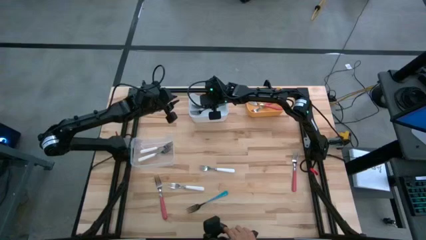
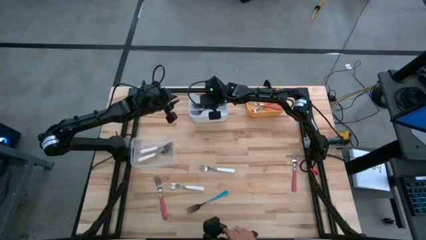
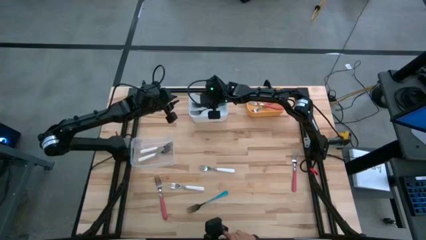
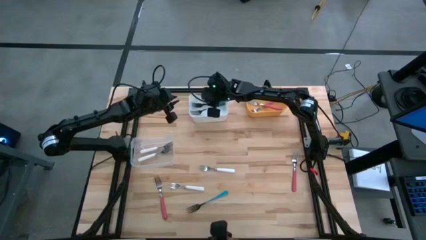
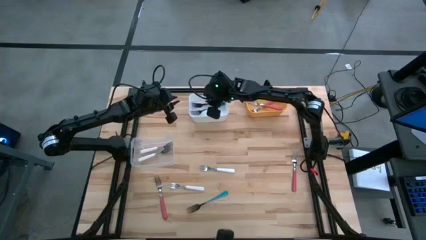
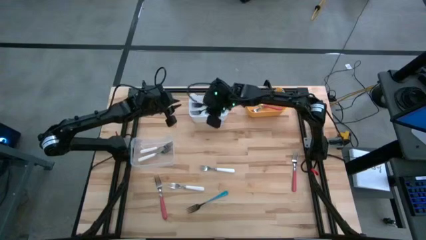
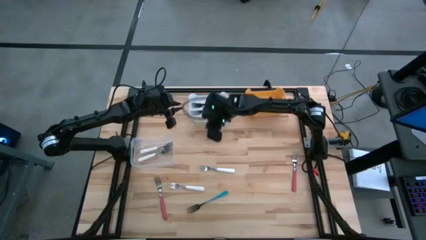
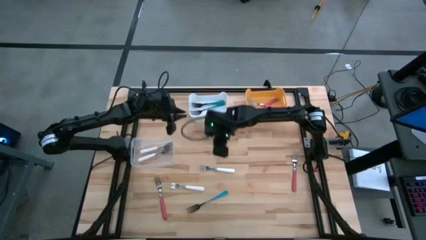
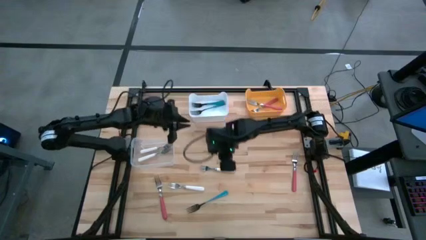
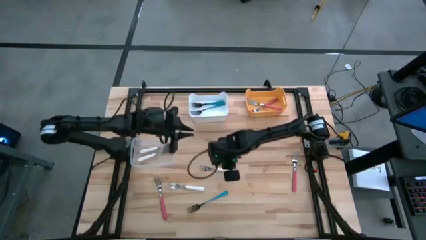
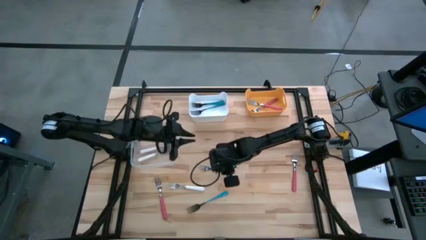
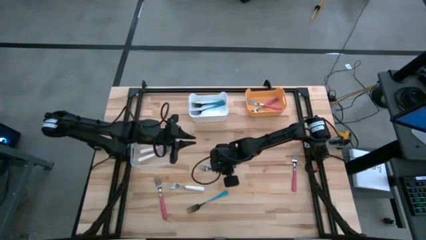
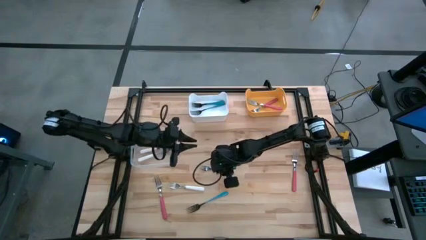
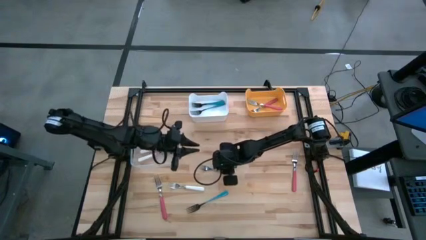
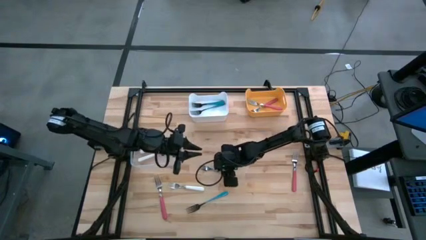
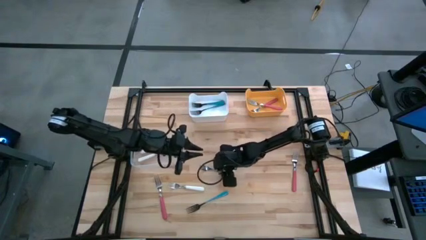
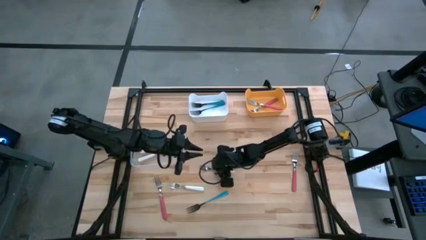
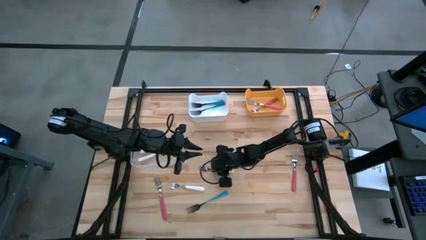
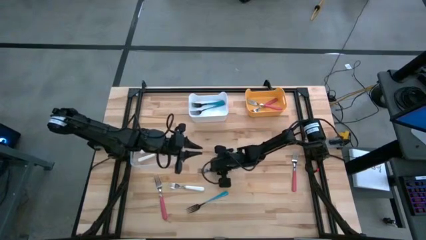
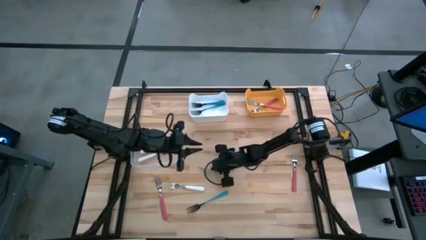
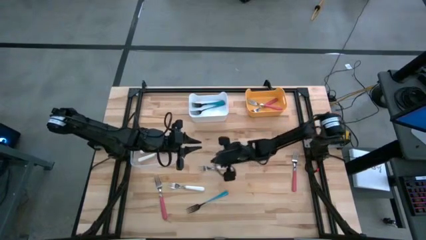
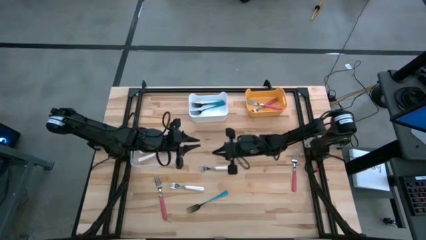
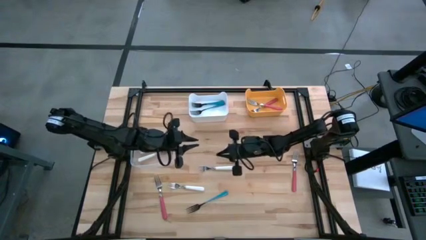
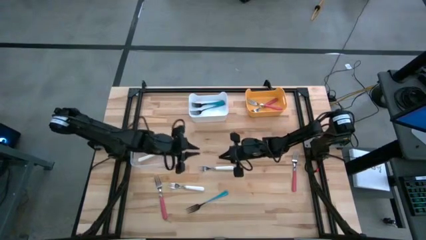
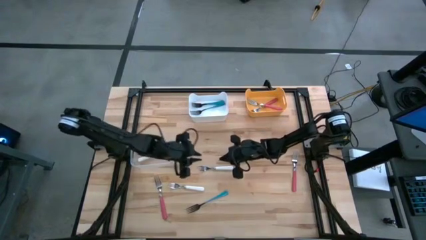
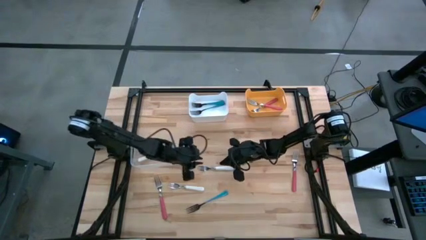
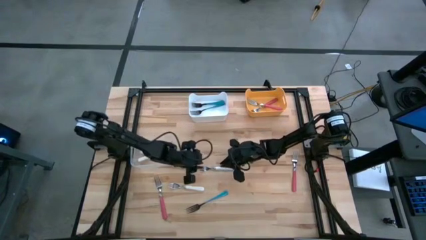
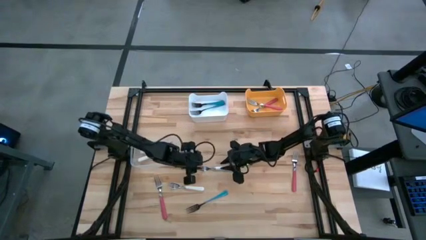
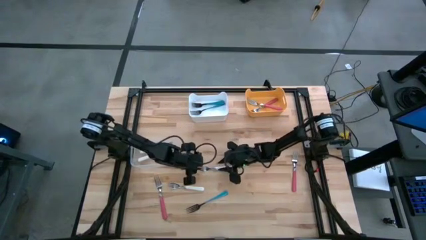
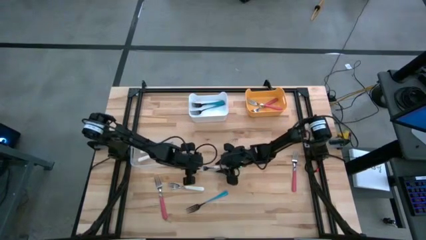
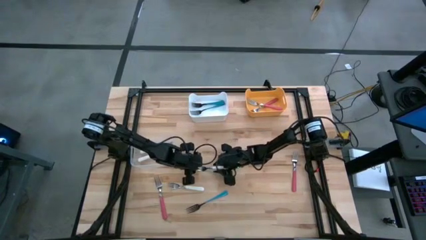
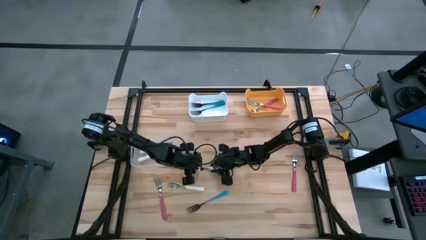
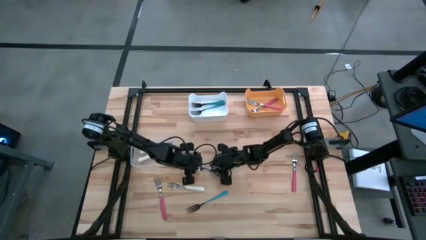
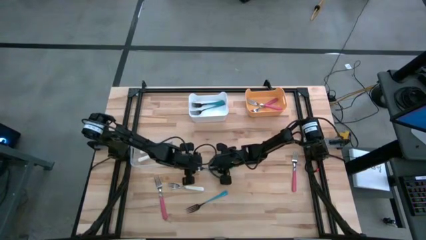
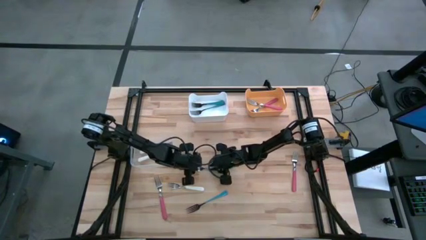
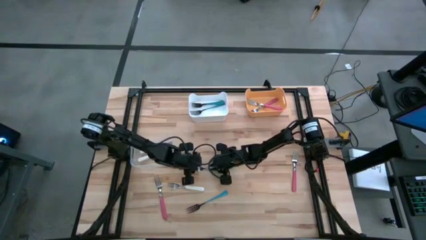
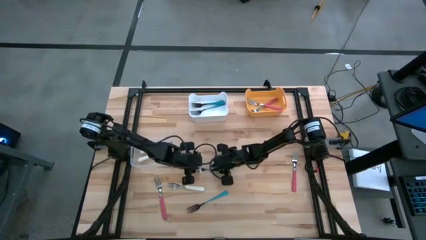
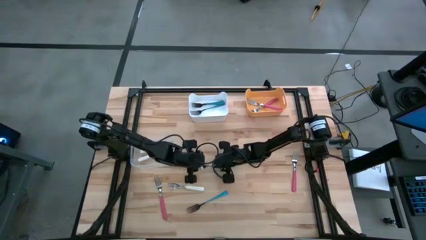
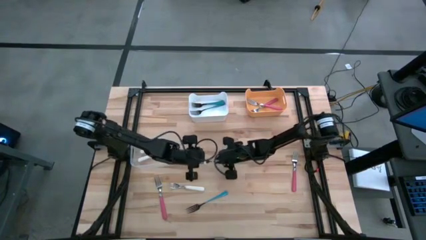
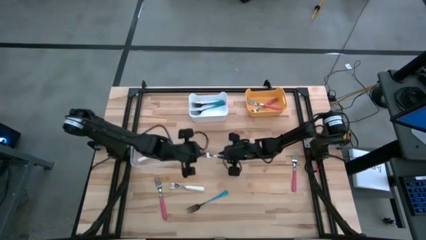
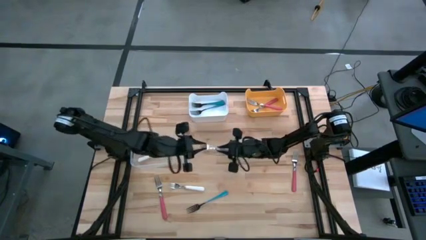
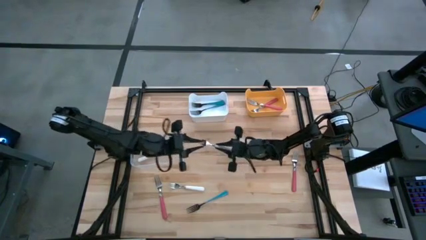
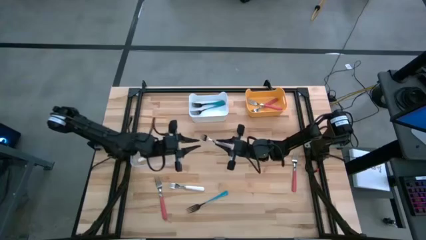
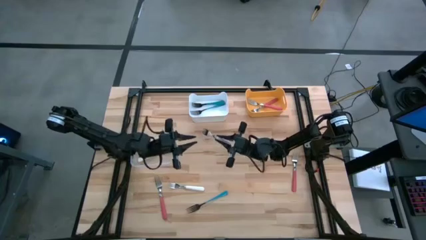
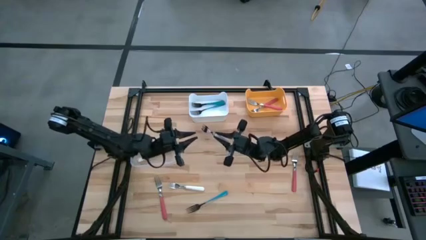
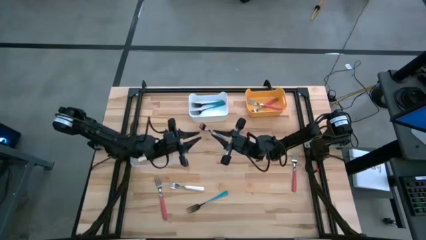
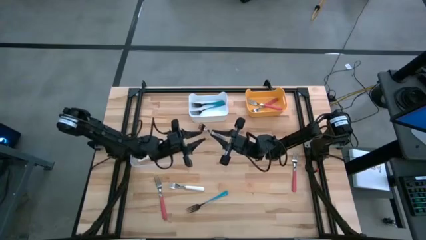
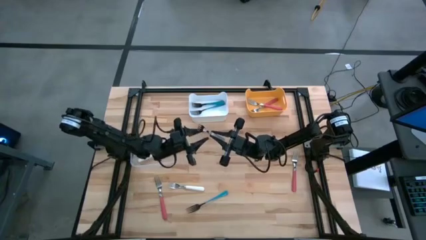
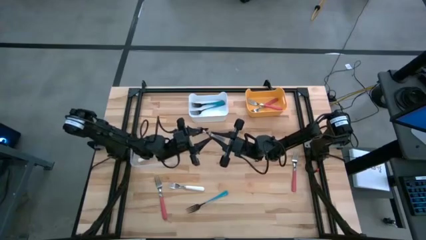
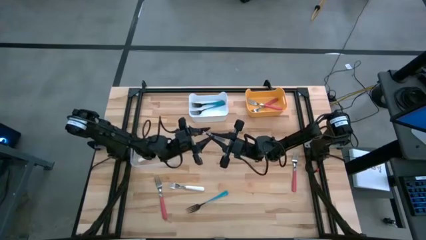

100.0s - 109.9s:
Task: Sort silverware by color (type)
Put the top white fork into the transparent bin

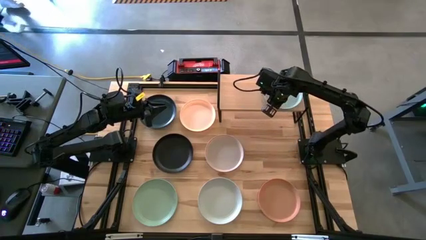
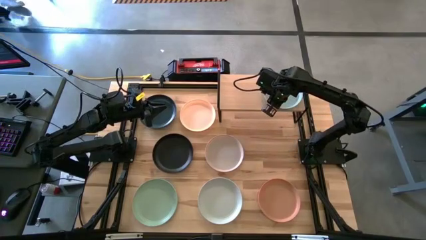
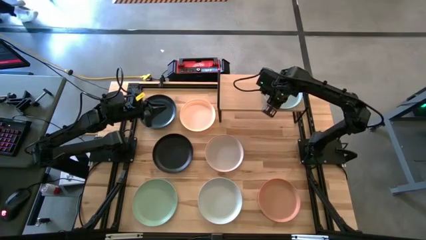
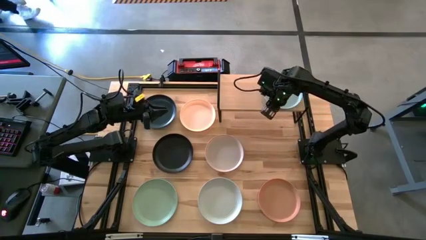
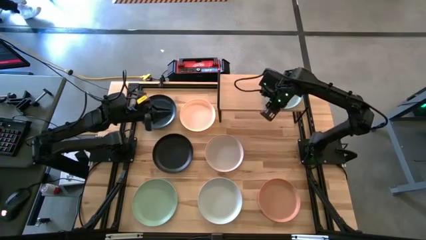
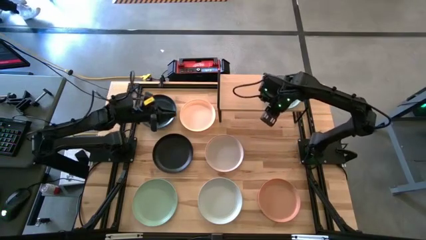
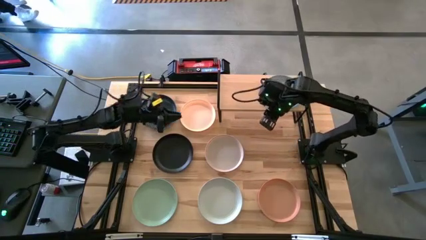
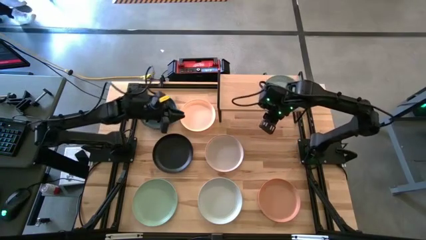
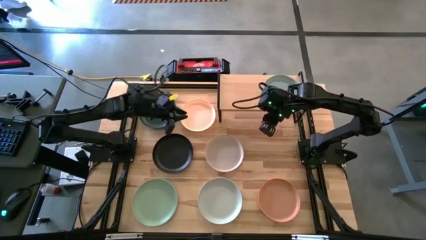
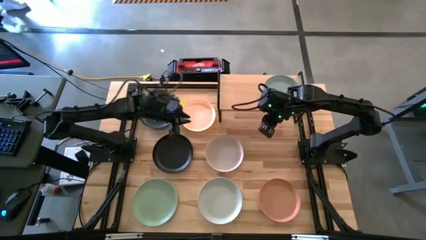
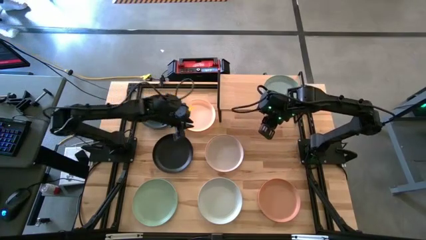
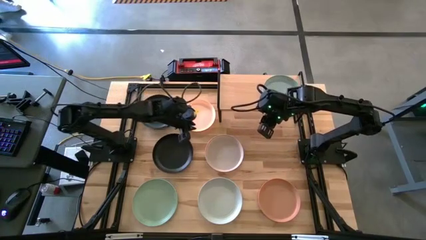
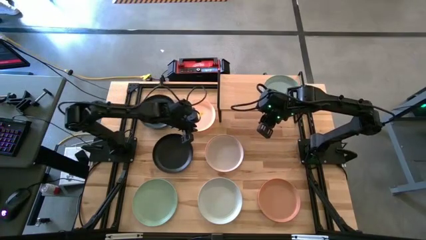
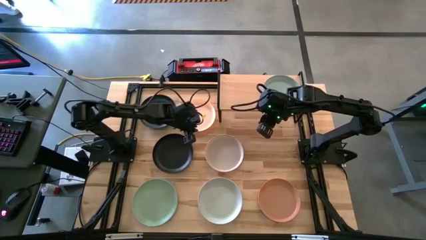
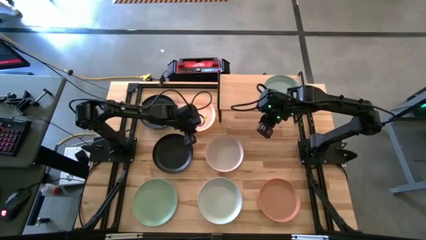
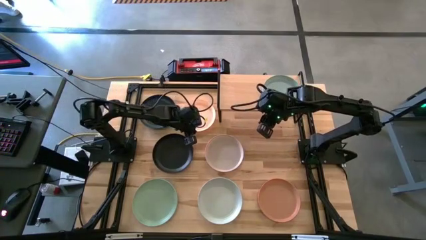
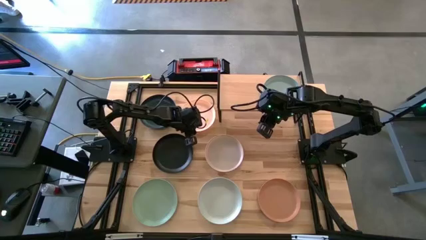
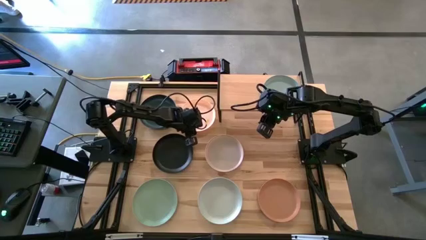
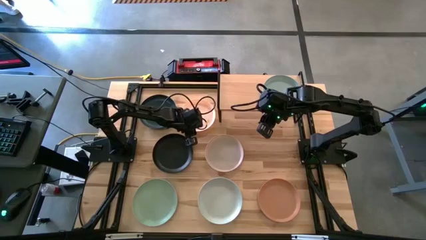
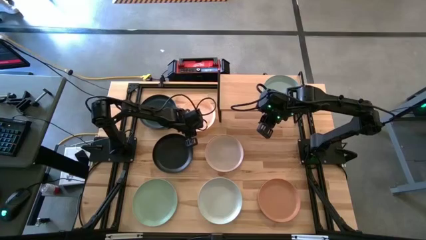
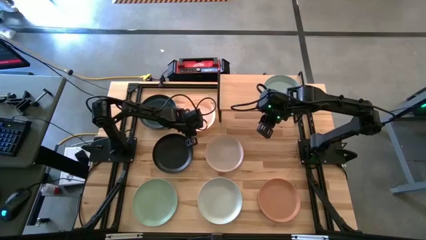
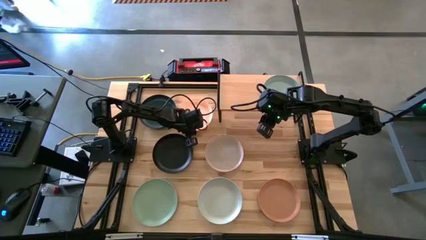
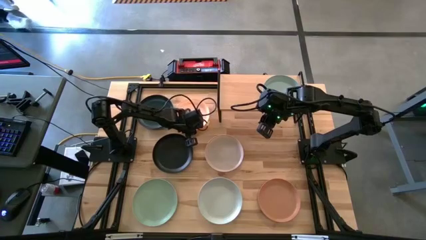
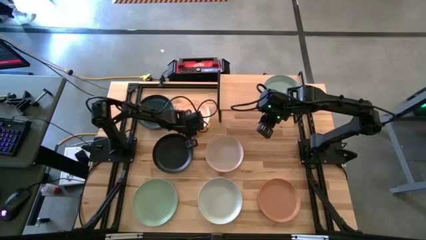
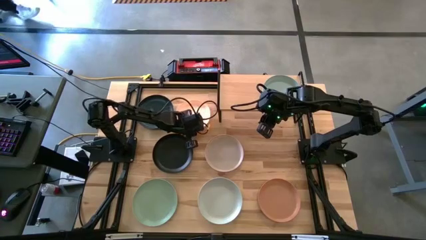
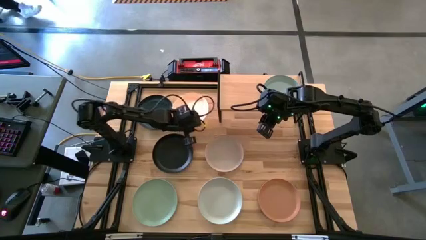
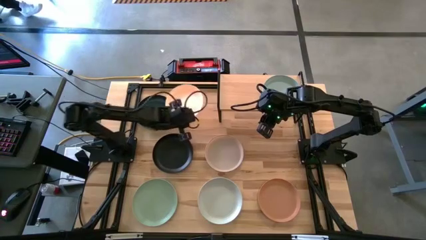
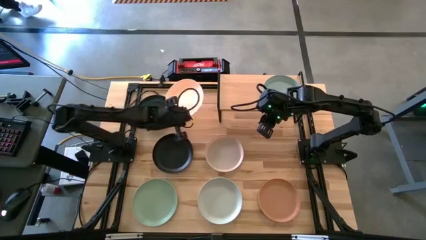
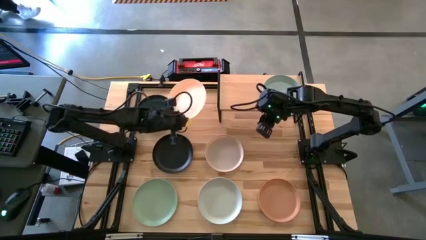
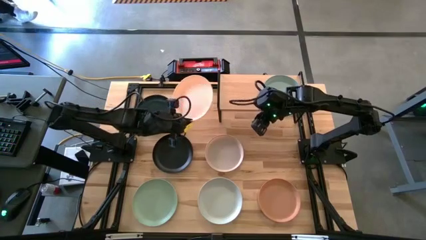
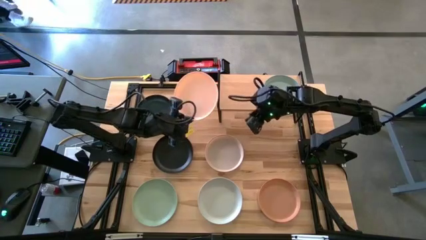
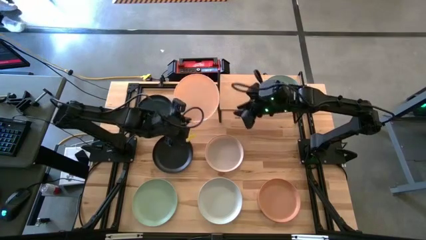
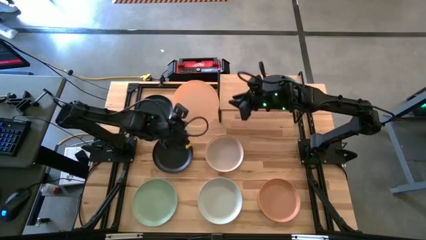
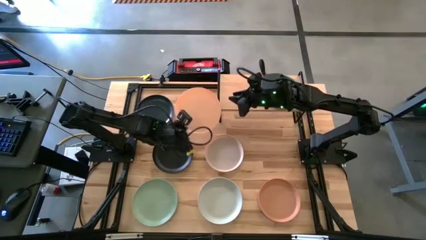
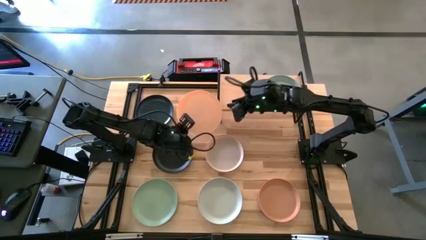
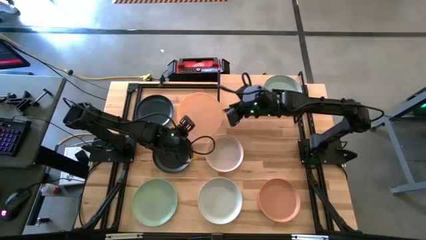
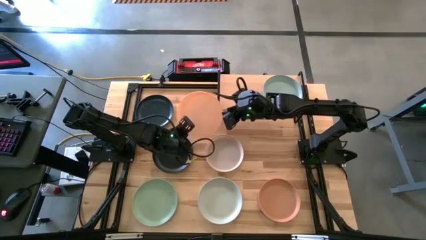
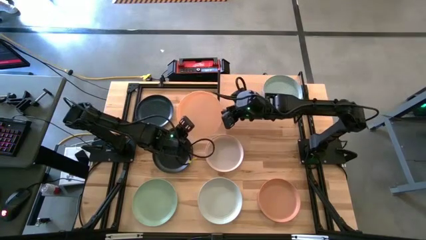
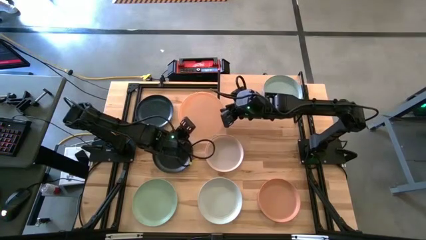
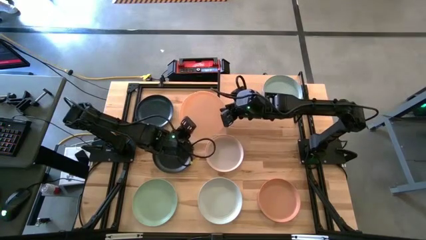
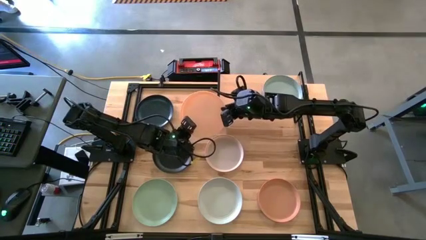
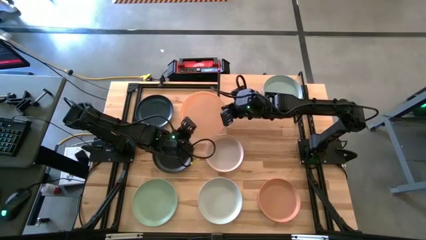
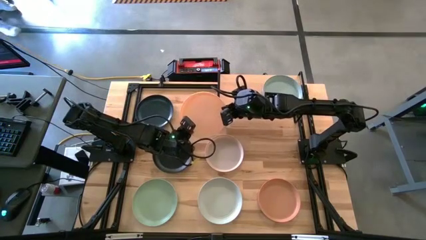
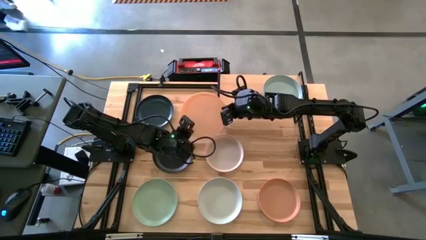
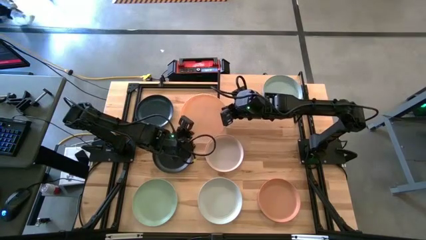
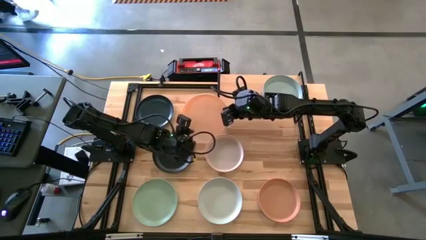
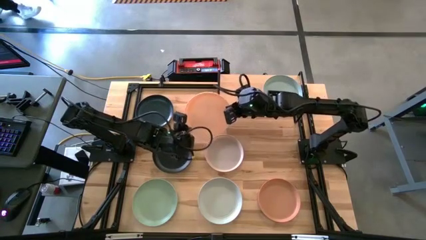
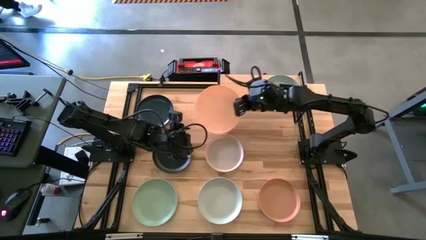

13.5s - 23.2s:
Task: Place and stack plates onto a shelf
Stack the pink plate on top of the light blue plate on the shelf
